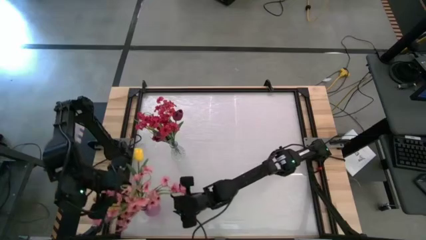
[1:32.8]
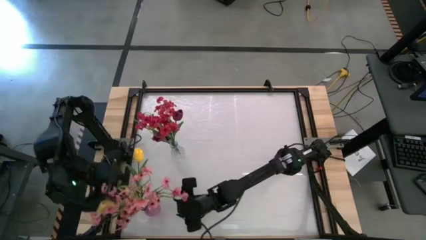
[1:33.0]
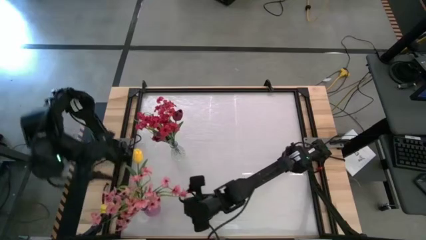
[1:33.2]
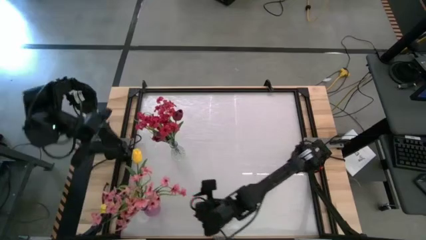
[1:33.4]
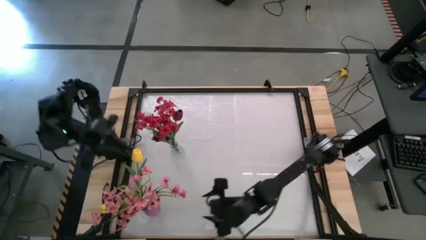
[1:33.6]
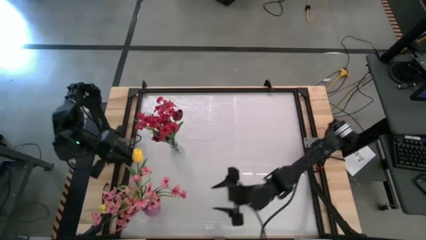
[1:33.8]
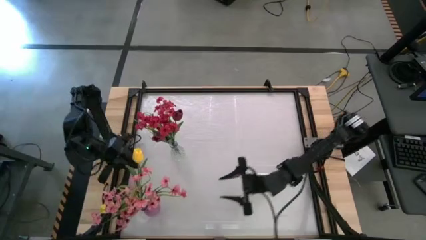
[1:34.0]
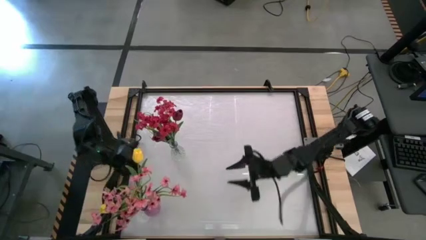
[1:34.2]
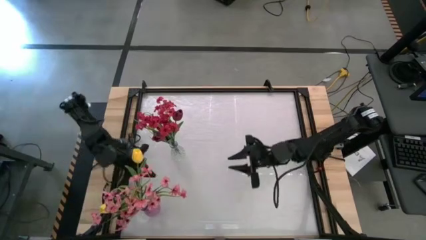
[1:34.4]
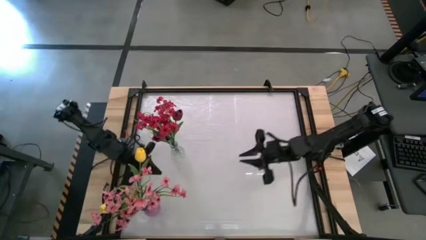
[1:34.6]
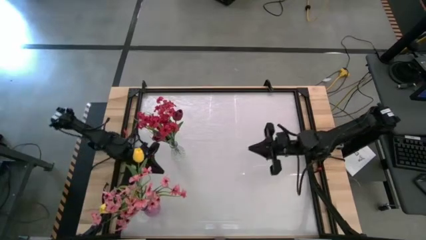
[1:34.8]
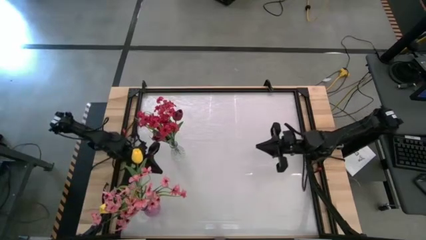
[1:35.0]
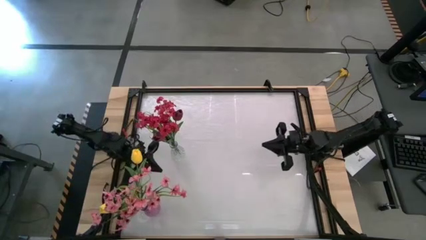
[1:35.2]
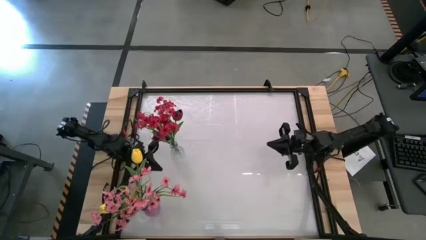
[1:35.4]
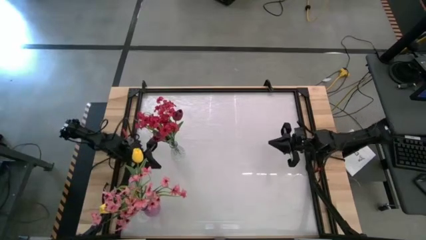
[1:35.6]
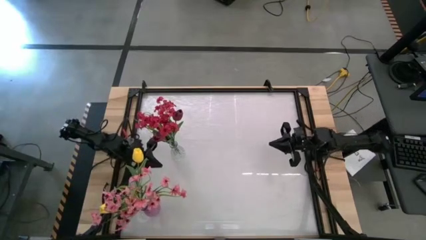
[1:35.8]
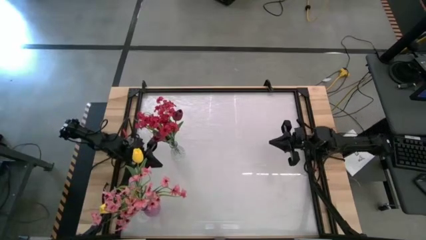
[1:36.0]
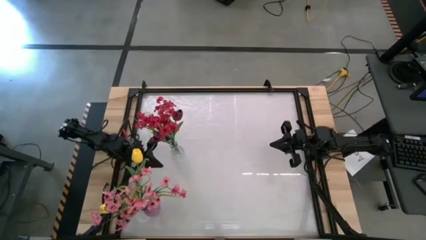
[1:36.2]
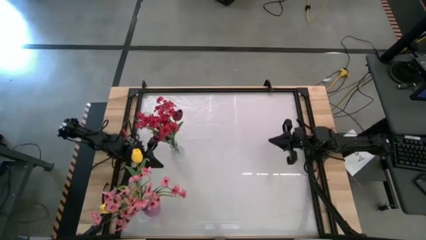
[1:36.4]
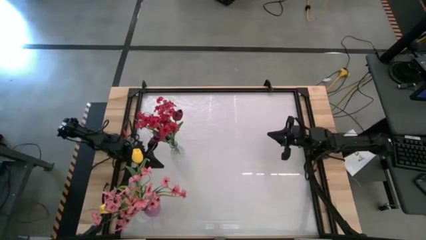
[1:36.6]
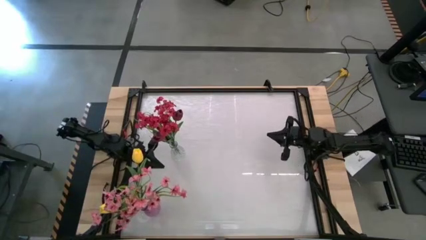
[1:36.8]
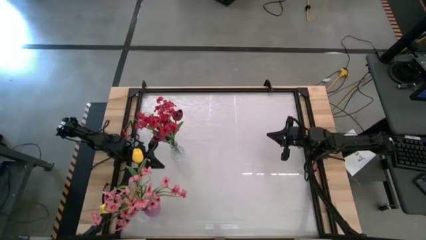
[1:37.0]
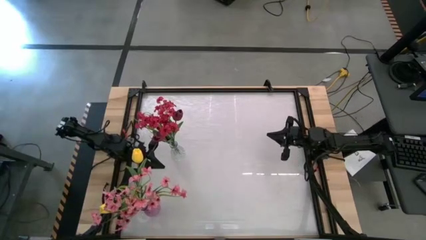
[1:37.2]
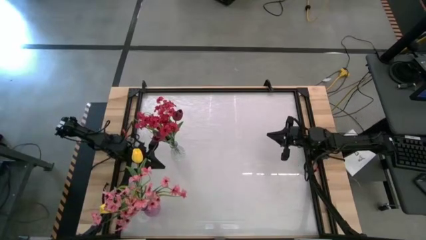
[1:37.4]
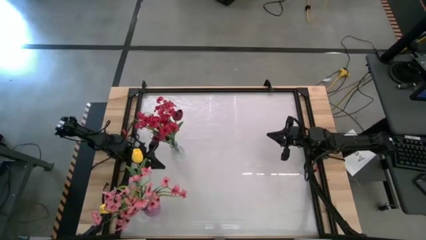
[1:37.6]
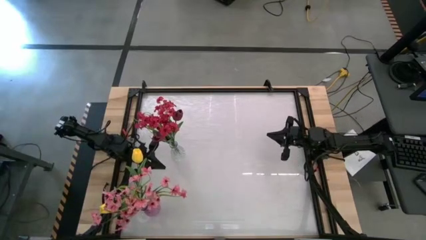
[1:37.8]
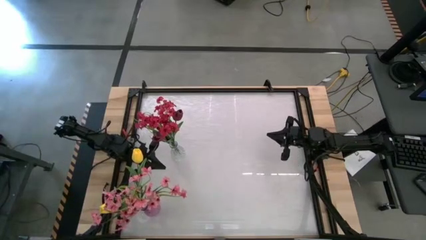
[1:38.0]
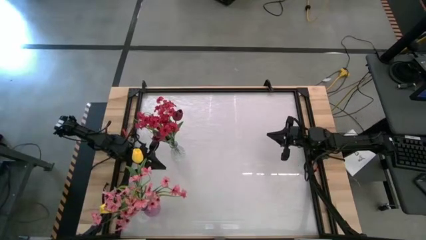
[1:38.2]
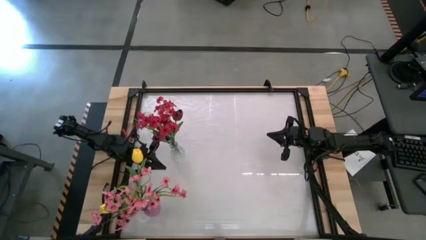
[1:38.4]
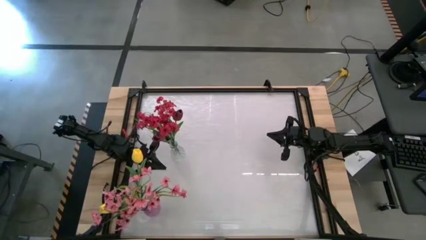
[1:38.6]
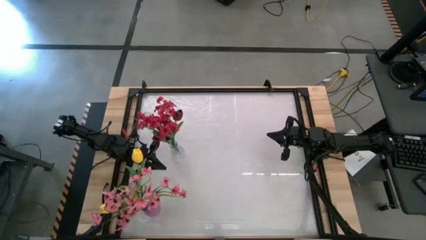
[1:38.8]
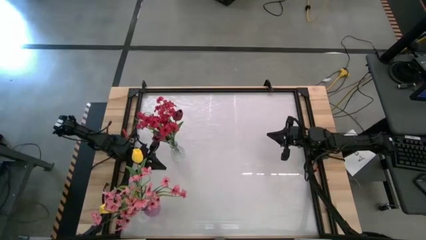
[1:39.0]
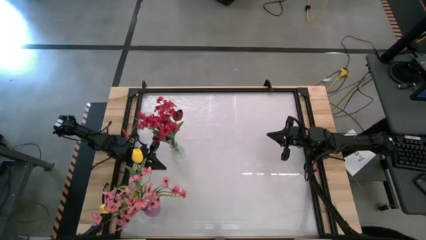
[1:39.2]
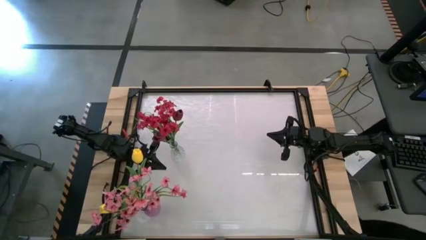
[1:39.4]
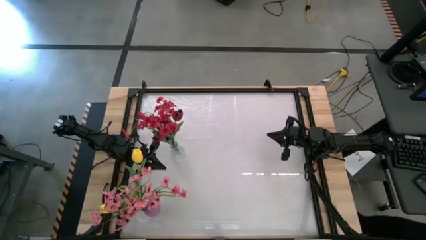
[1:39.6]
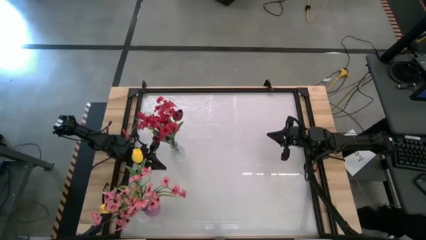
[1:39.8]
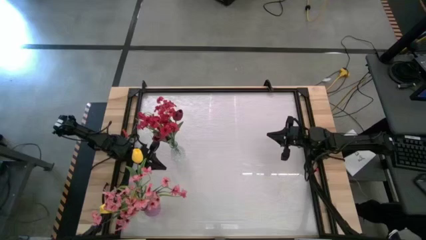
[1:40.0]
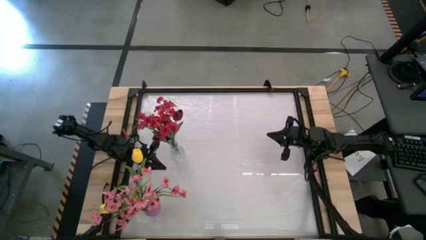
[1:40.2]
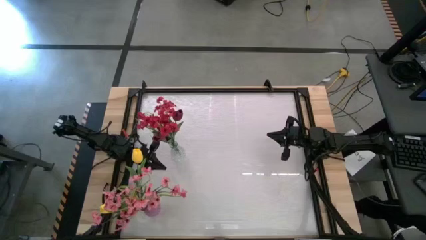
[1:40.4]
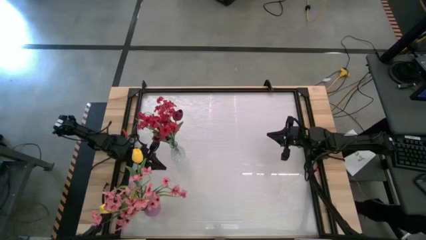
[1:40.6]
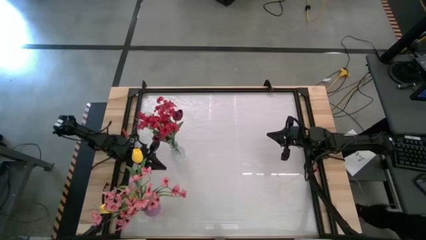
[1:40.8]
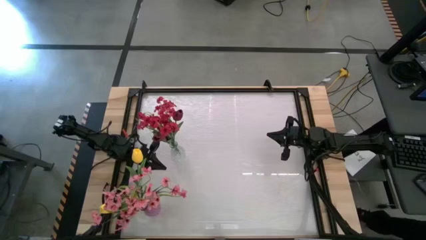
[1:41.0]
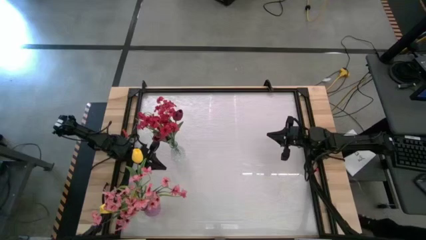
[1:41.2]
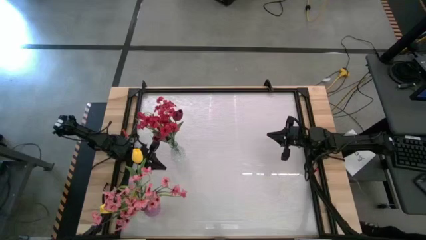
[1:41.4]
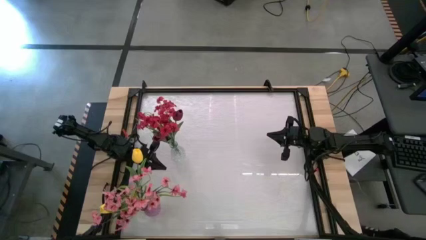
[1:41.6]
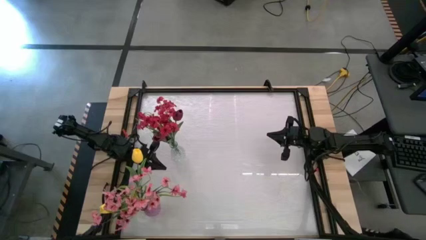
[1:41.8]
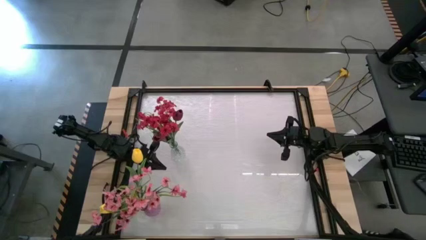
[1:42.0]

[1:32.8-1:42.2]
Task: Sort flowers into vase by color
Return to Home Position

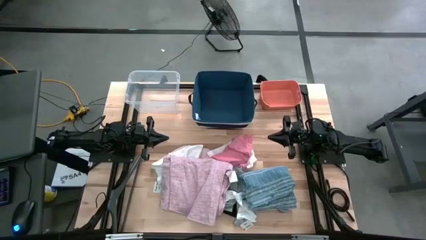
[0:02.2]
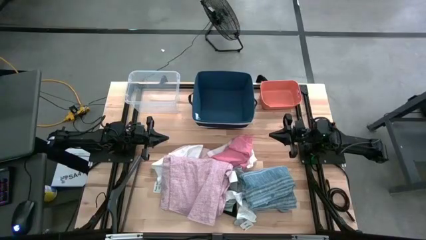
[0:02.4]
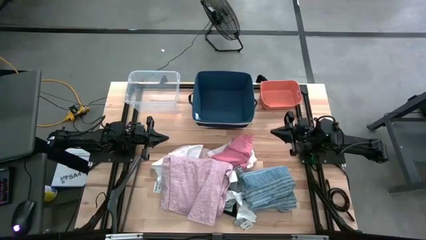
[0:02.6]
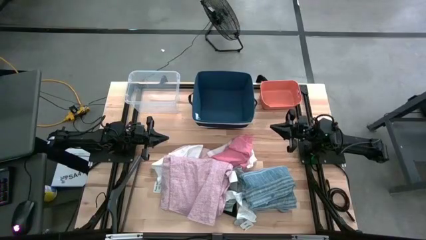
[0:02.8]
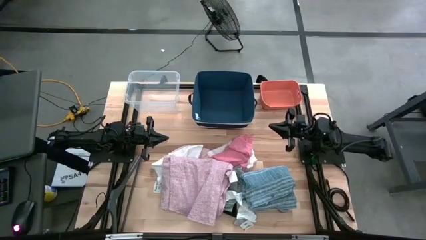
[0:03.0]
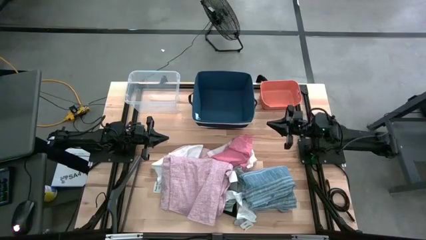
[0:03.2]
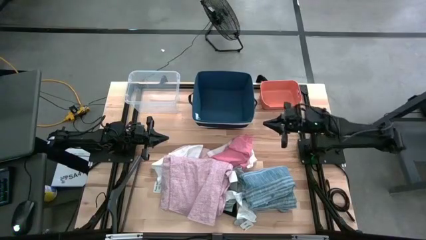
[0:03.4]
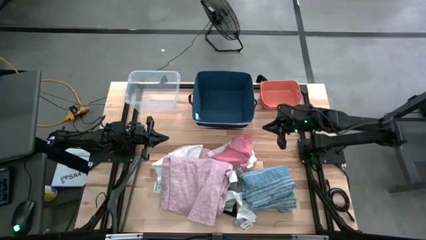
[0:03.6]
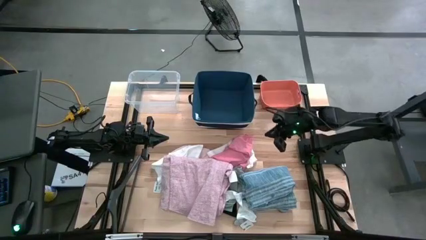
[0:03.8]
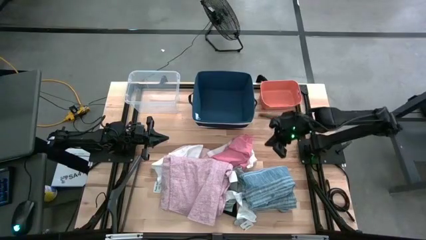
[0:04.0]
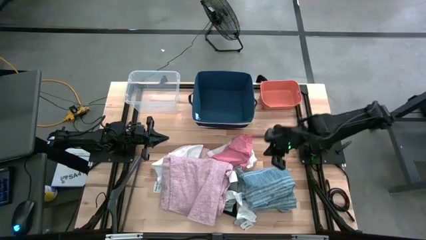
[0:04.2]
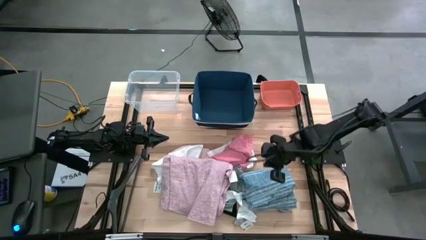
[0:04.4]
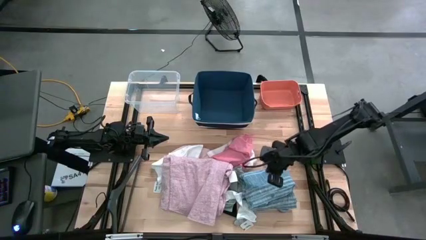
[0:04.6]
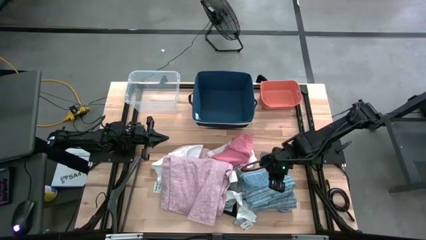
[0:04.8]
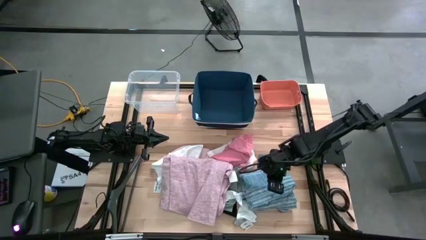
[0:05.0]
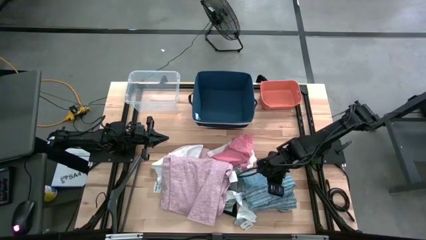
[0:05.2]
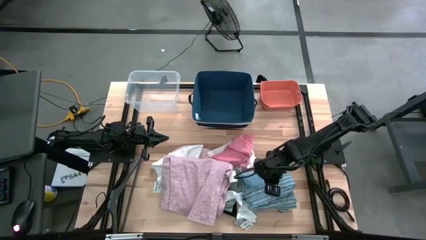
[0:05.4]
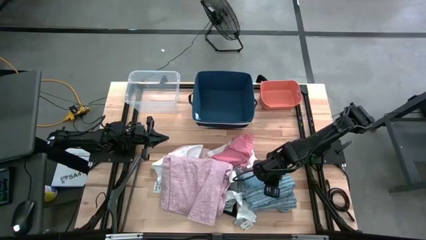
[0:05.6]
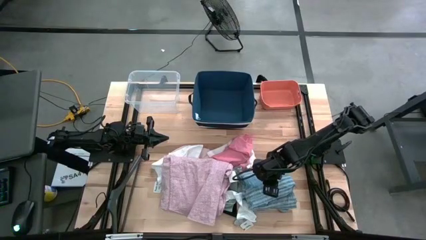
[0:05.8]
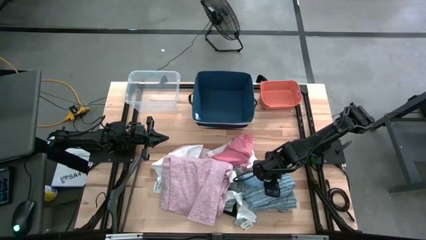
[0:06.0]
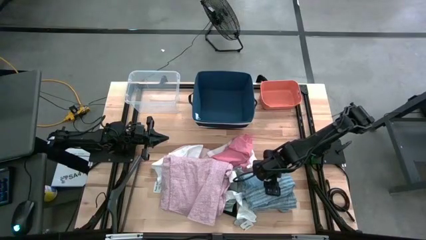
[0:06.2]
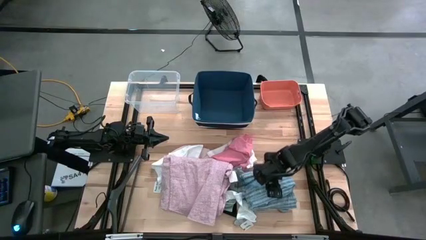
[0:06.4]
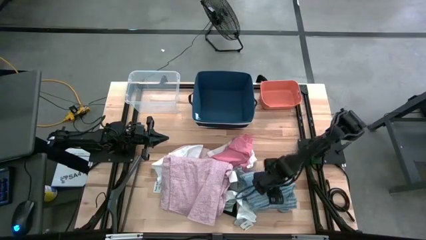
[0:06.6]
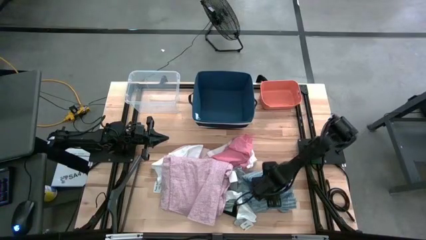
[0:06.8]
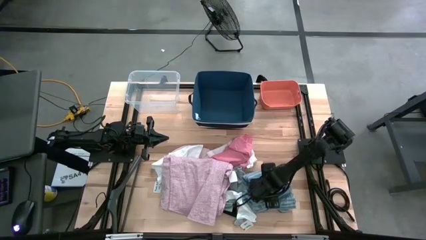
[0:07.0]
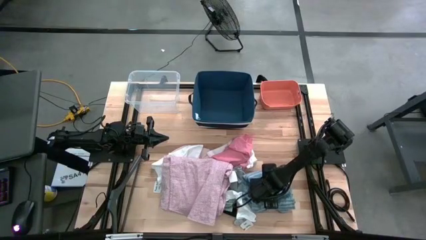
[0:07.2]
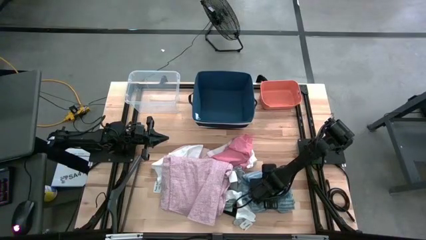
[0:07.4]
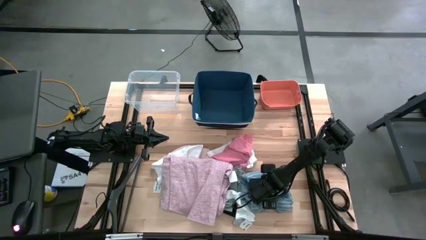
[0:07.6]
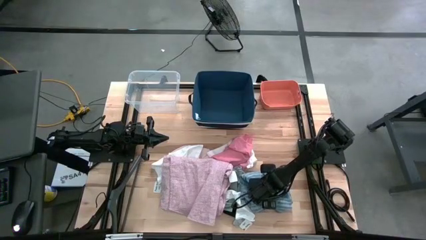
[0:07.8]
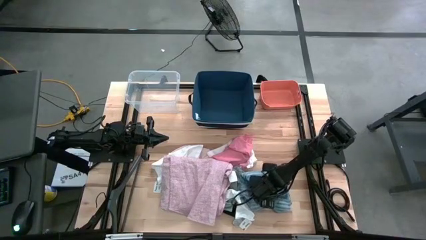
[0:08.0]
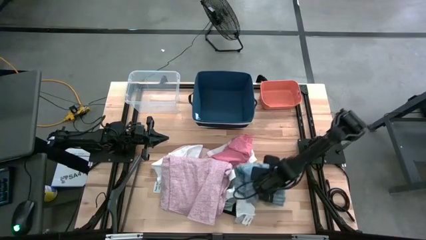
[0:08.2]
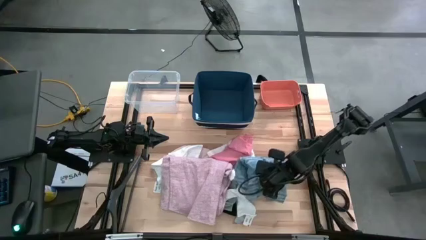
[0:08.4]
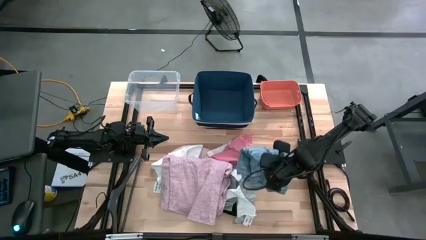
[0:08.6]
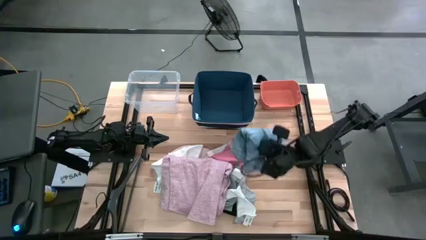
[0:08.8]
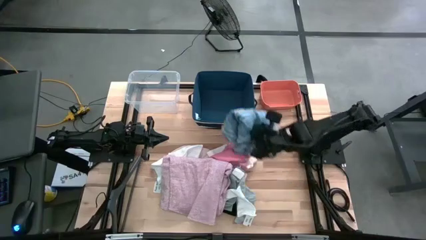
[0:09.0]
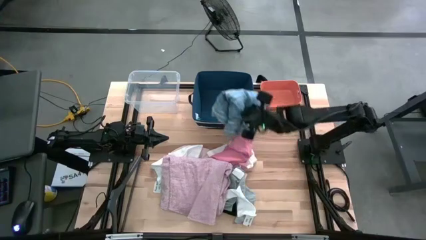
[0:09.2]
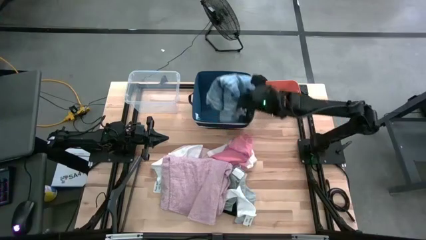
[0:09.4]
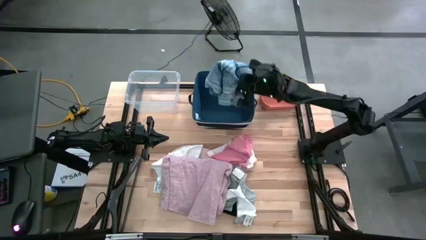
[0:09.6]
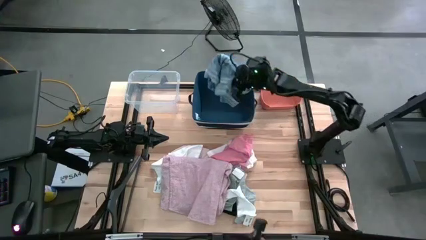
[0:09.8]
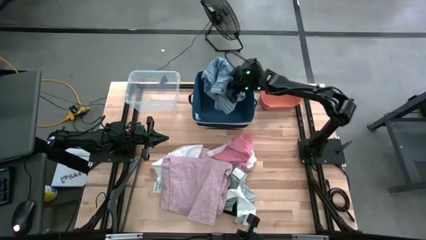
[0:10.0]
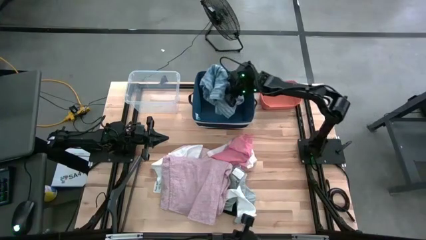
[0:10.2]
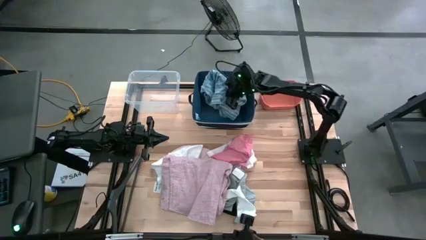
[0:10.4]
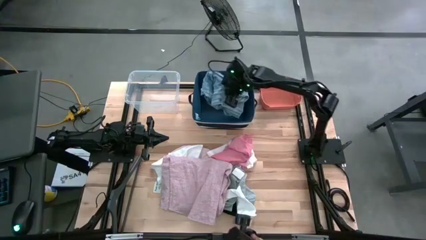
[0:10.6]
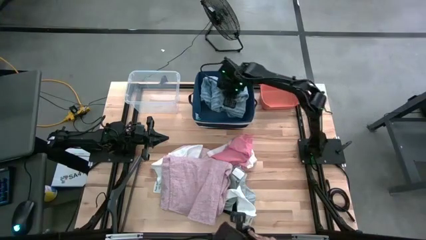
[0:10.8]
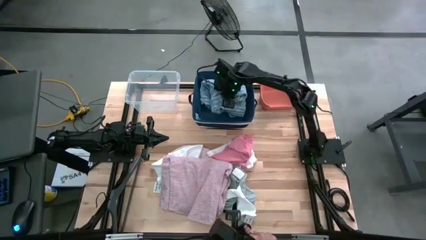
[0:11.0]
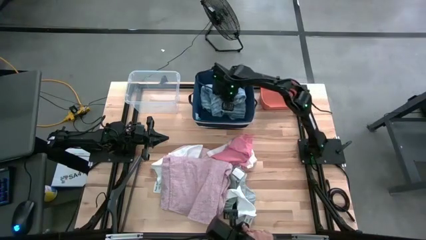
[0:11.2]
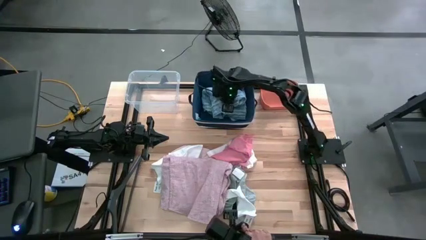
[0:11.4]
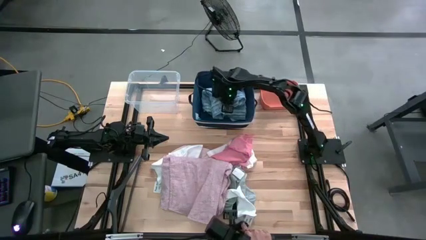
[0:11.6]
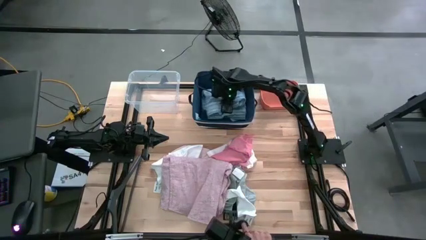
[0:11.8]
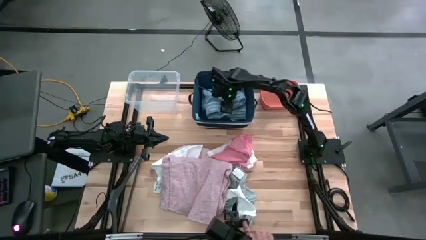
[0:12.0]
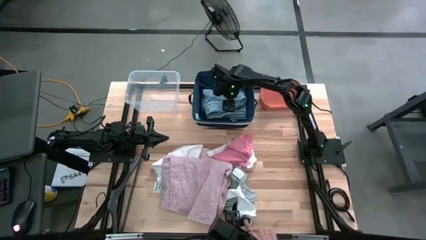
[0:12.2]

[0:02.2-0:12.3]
Task: Pick & Place Cloths
Put the blue shirt into the blue bin
